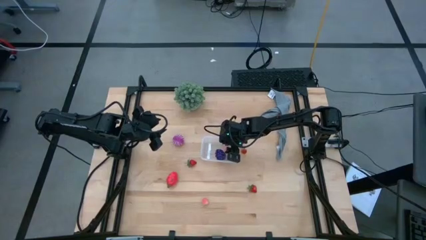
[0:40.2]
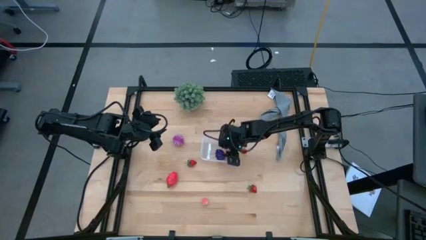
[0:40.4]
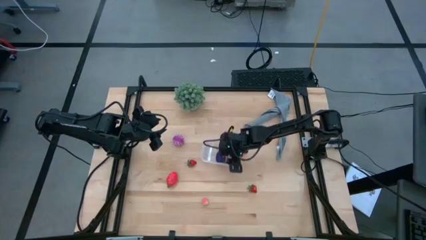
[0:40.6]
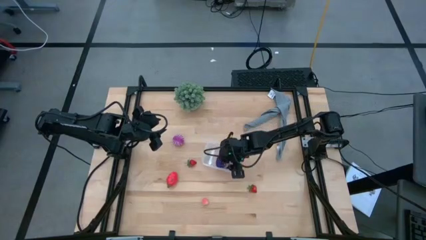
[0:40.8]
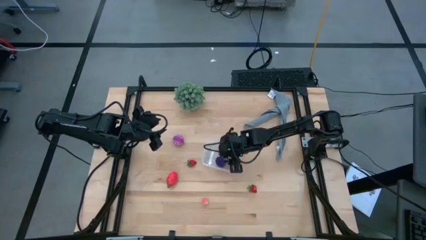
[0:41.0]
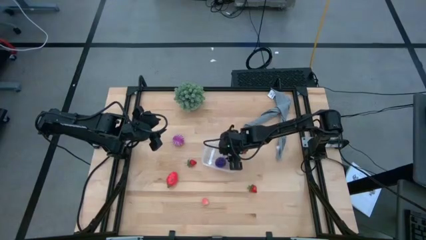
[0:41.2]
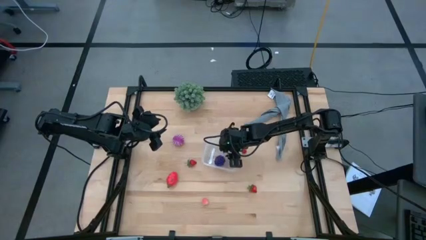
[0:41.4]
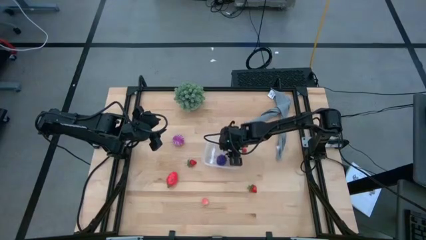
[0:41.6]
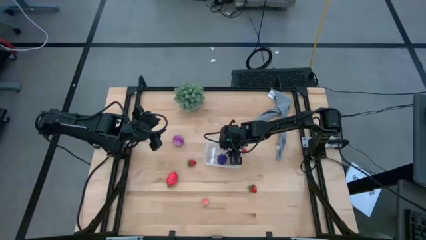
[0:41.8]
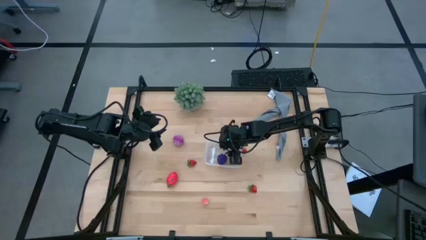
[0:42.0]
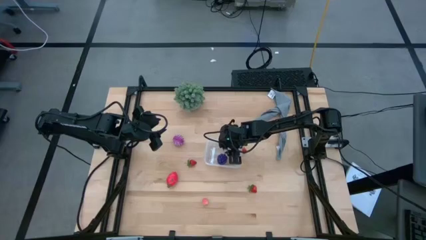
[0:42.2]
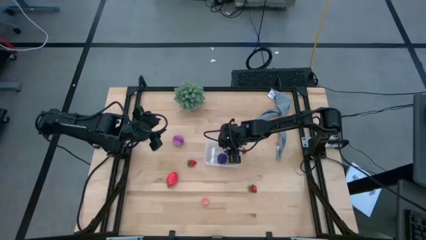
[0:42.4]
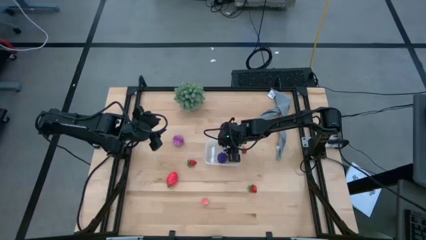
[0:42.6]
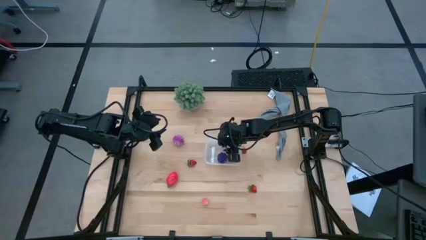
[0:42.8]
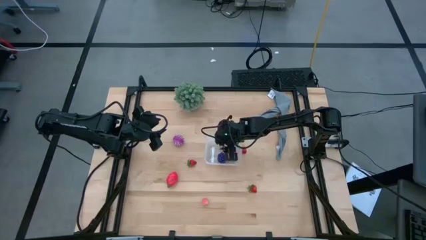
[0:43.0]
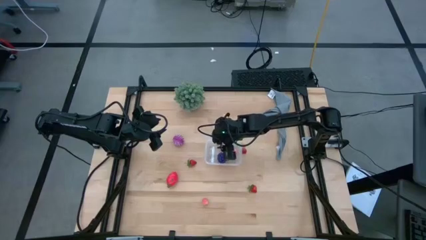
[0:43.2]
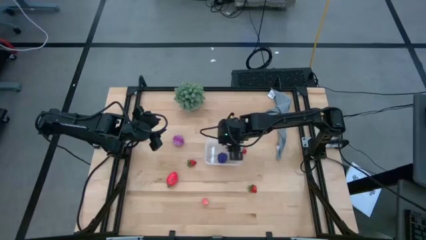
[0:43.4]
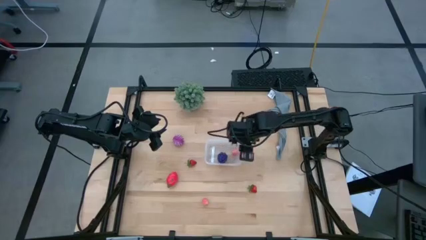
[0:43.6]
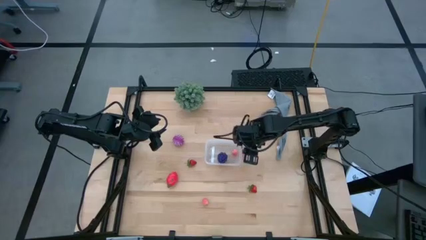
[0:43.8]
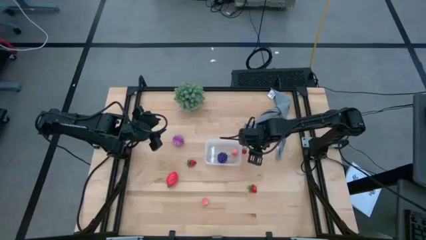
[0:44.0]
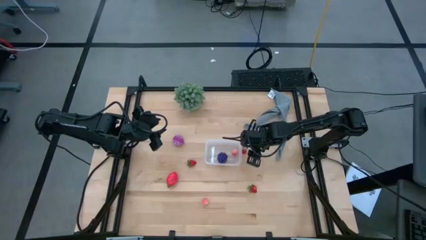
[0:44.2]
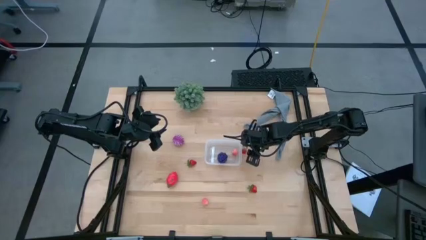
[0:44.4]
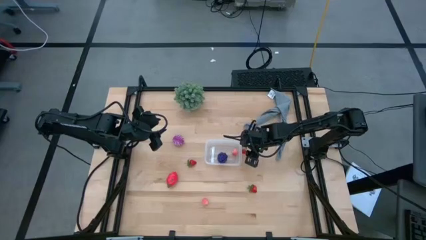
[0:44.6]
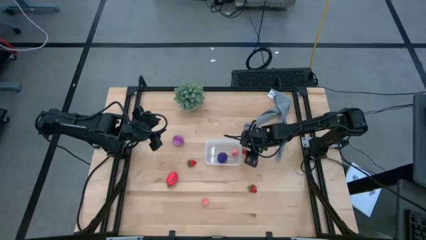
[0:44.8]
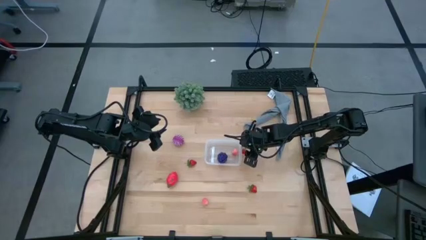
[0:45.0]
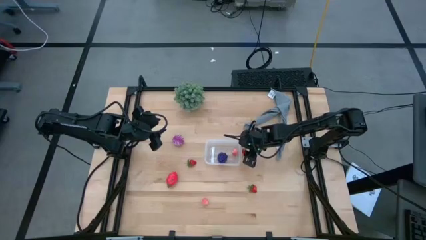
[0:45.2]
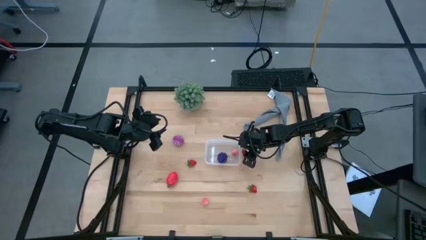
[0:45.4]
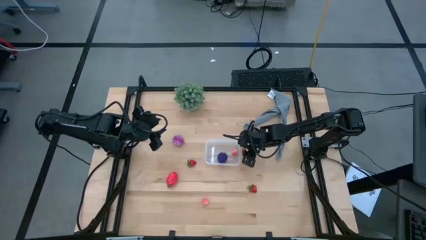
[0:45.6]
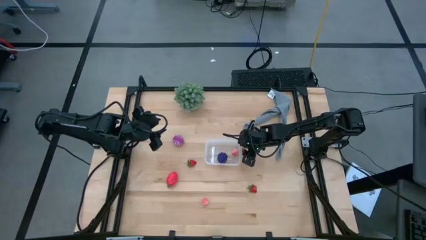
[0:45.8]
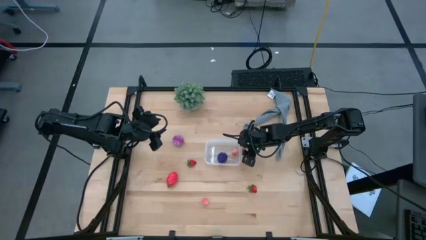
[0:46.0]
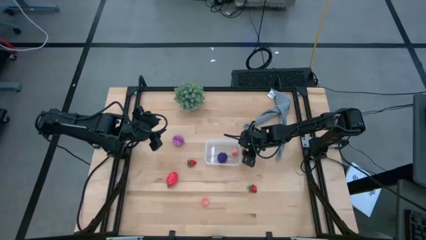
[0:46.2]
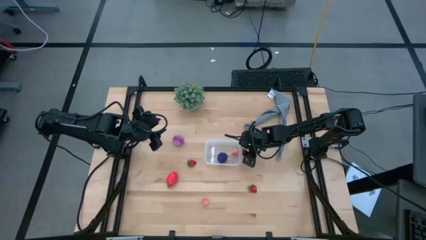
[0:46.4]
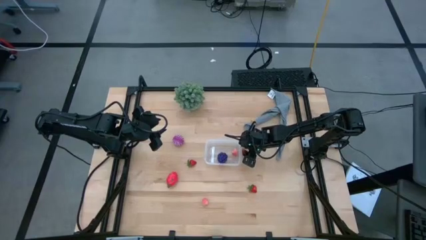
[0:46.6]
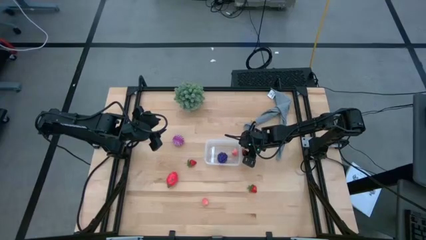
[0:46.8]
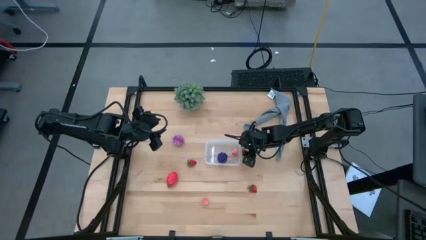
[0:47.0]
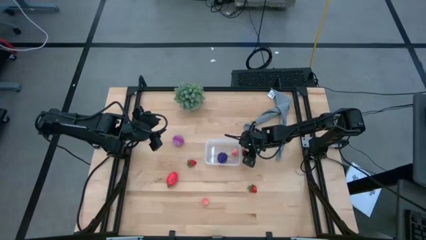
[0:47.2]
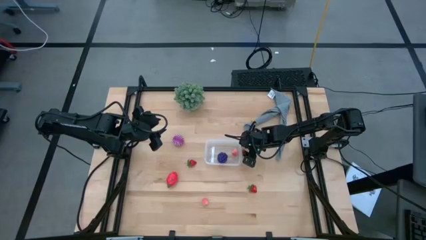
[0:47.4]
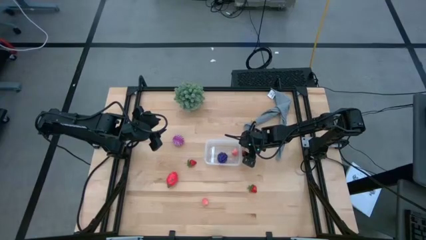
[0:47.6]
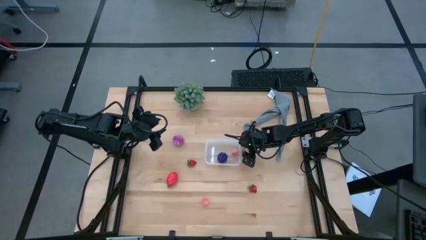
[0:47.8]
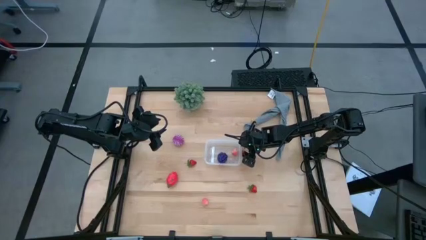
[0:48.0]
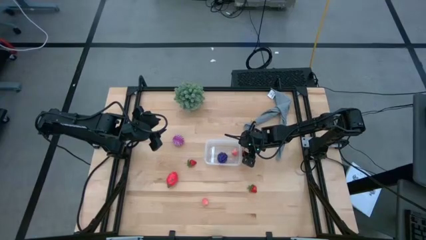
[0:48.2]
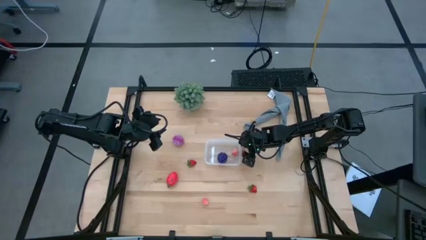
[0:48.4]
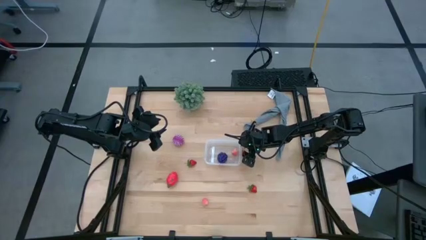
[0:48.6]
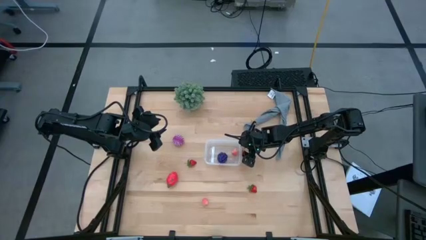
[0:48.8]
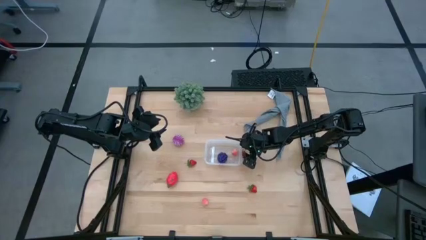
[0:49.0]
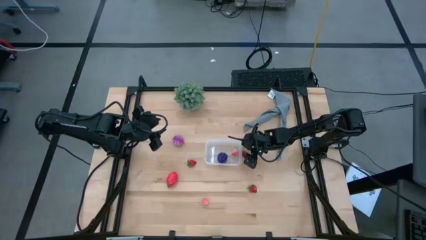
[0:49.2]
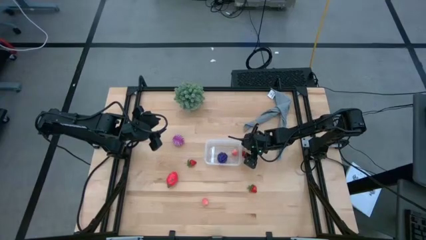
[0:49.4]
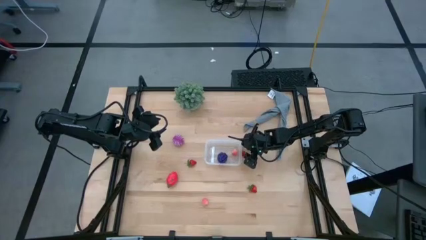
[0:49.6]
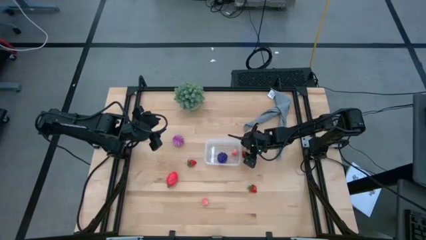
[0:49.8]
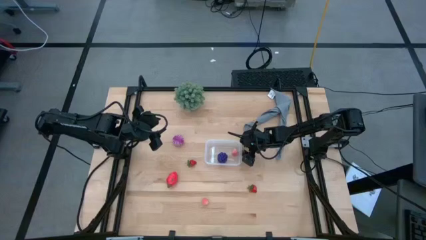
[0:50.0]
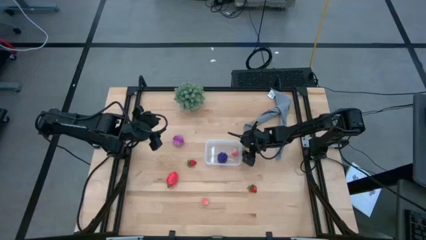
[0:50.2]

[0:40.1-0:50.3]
Task: Pick and placing Produce into tupperware
Put the top right strawberry into the transparent container

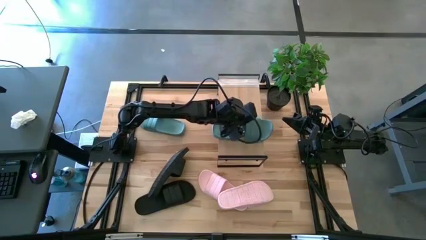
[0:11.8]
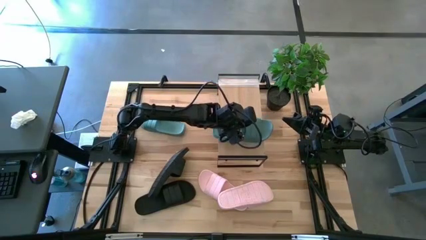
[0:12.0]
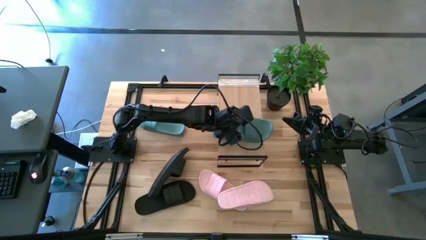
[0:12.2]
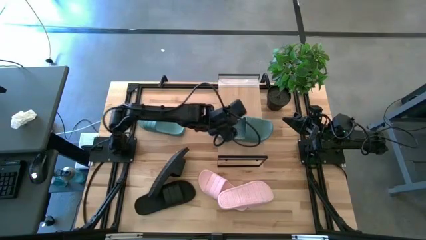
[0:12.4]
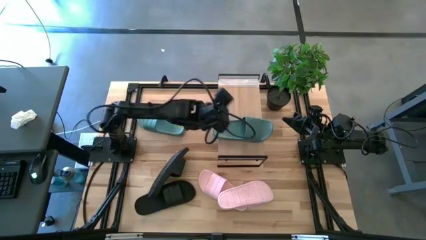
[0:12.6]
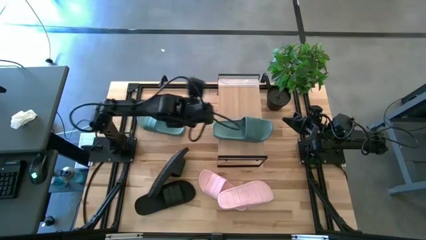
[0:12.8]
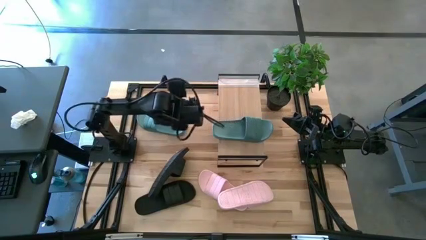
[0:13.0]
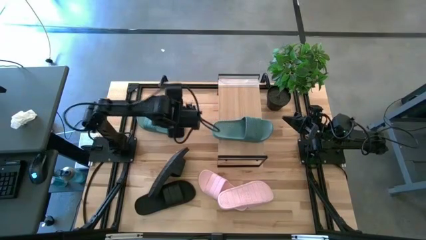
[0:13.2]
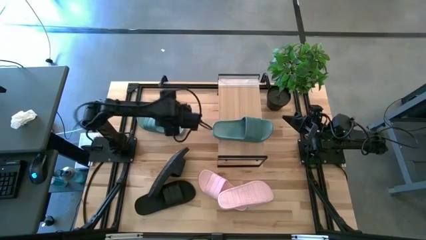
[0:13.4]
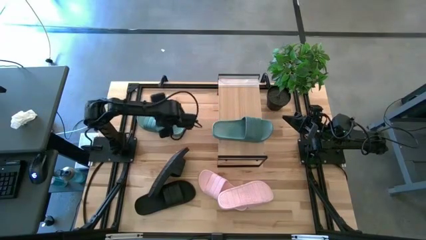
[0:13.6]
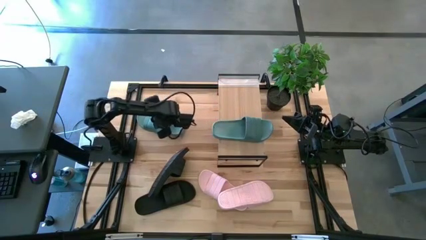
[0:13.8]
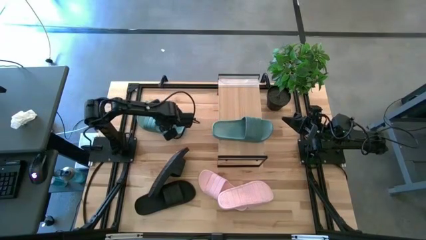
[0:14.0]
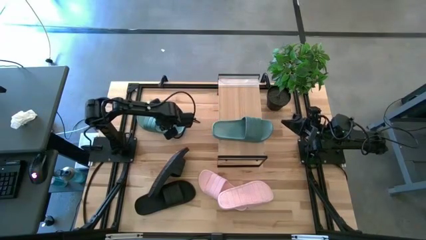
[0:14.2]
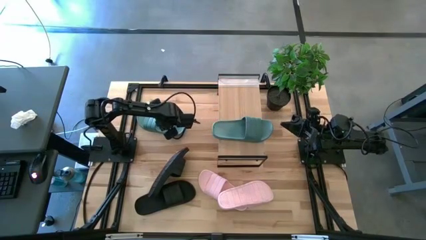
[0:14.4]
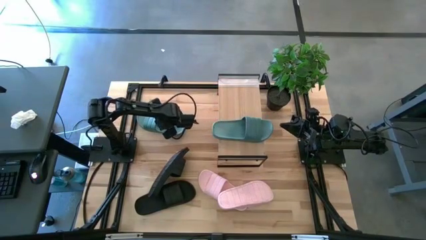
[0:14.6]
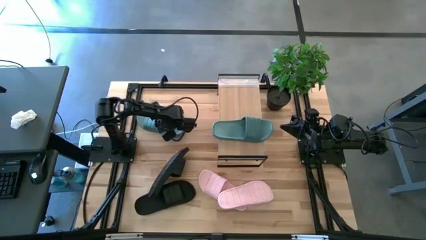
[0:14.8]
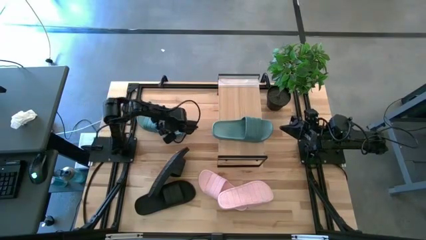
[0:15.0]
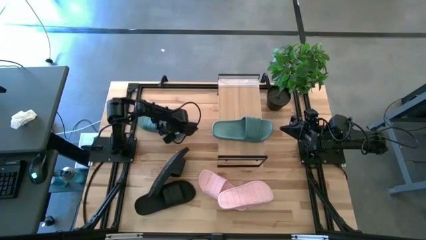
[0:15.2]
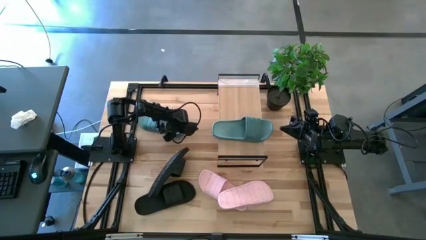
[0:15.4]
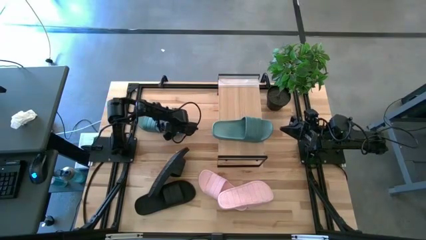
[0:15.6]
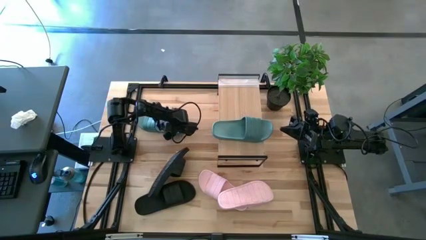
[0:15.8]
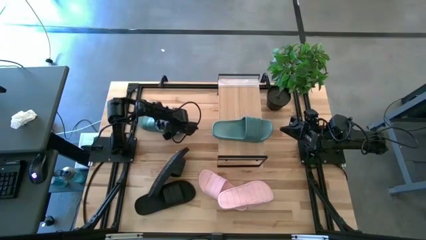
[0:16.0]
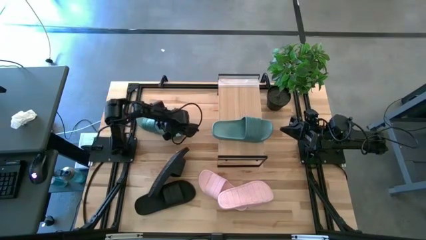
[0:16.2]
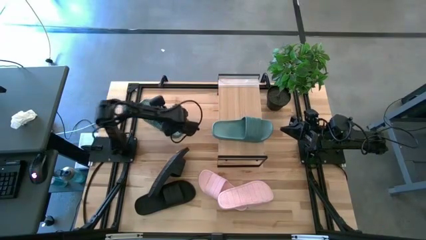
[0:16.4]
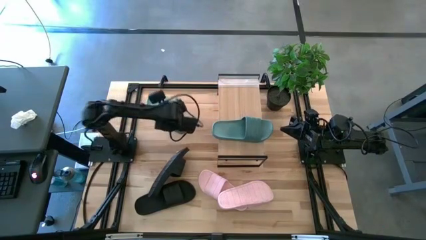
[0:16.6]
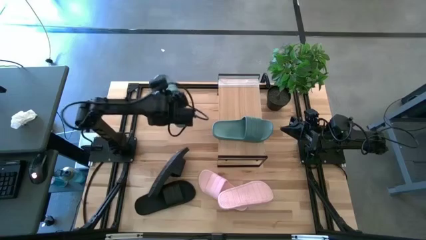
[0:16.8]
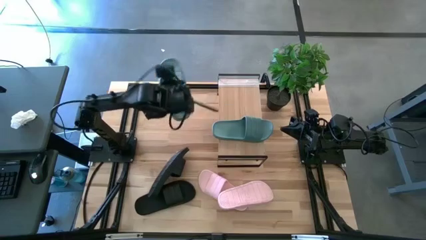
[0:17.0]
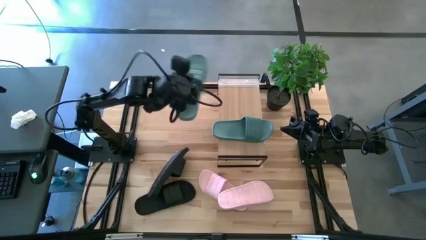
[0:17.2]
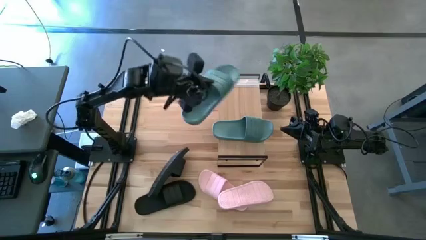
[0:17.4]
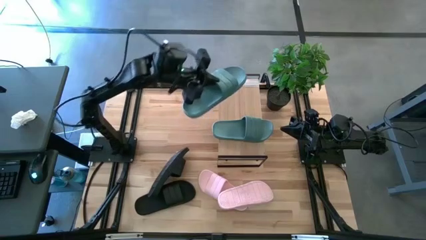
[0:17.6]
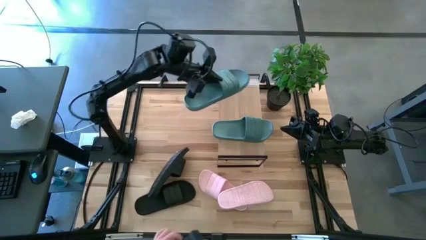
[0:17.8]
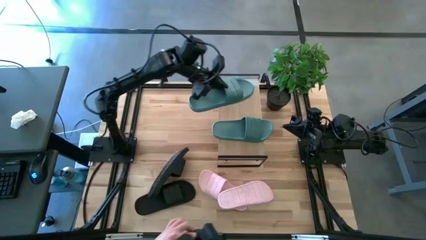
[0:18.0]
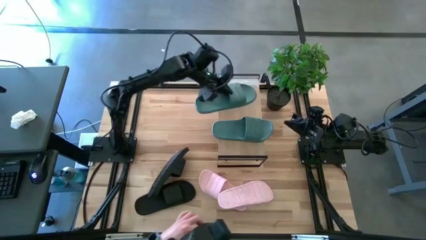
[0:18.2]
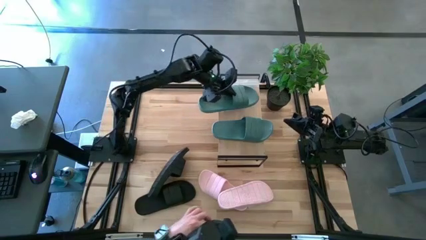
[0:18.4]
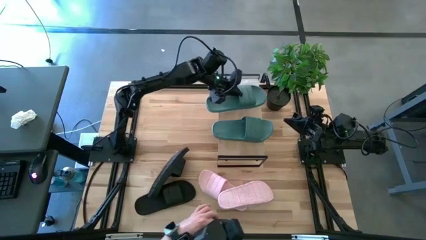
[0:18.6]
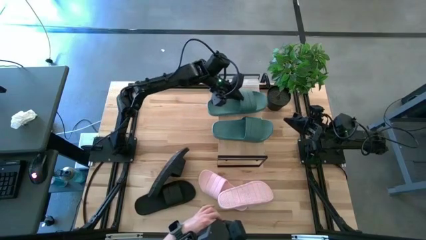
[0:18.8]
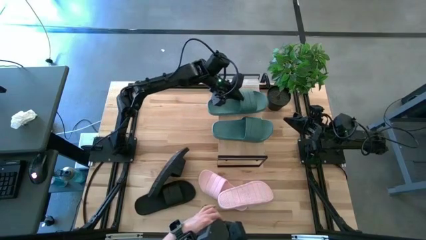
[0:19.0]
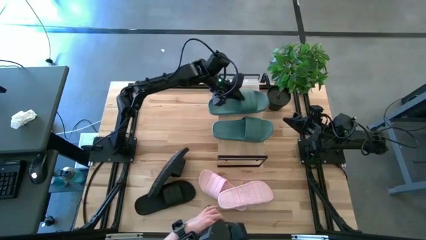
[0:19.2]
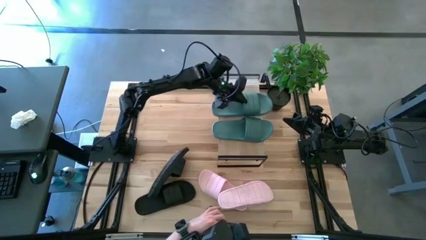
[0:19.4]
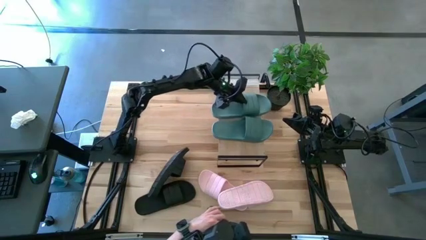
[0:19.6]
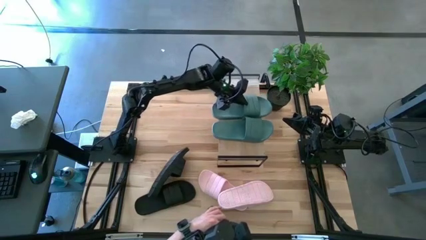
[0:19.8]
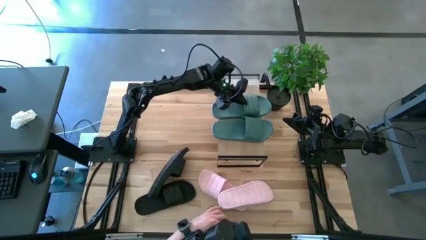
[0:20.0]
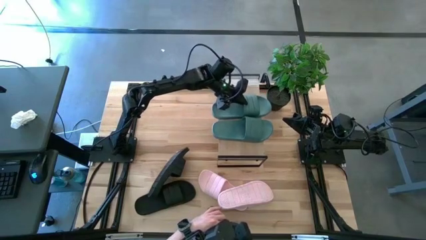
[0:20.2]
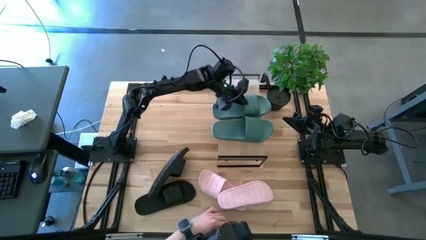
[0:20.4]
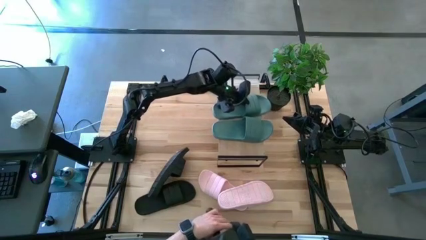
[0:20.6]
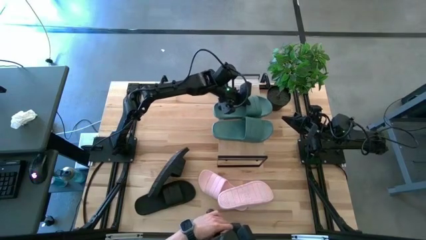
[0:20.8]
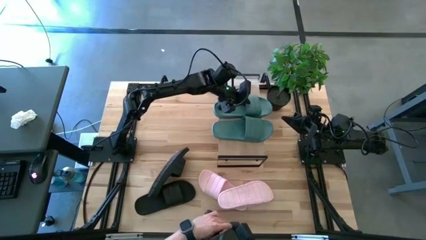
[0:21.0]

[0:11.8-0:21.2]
Task: Pick and place slides into the shelf
Put the green slipper on the shelf
